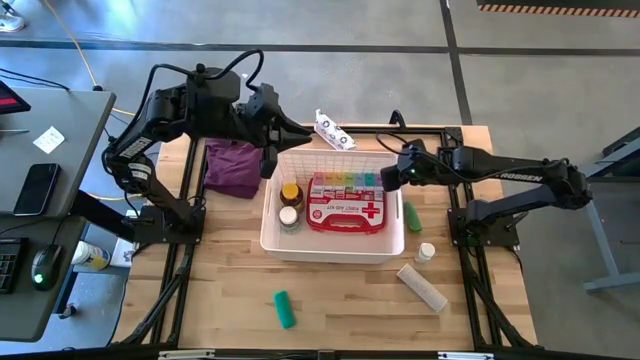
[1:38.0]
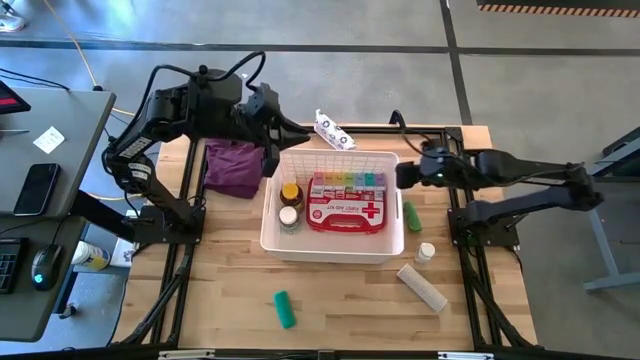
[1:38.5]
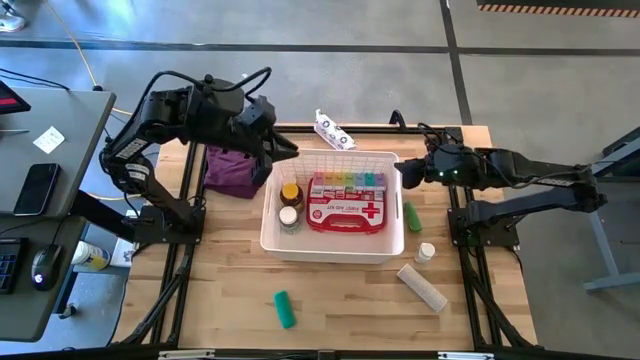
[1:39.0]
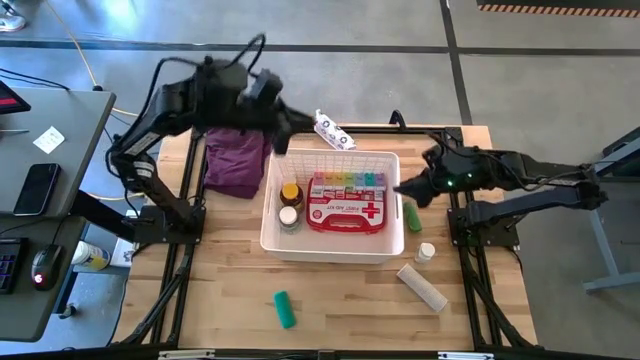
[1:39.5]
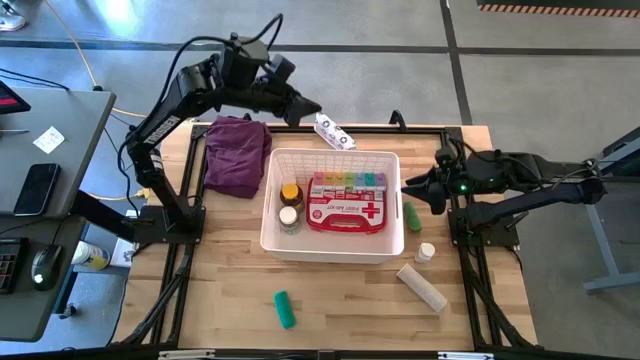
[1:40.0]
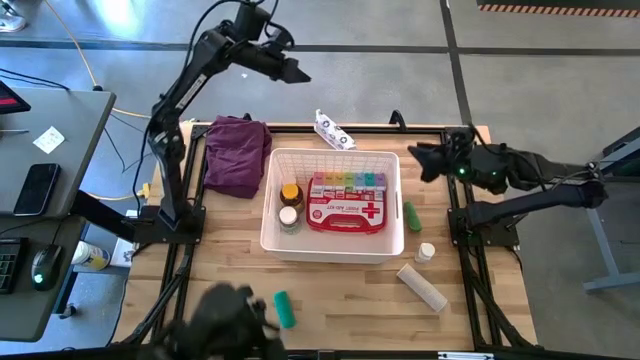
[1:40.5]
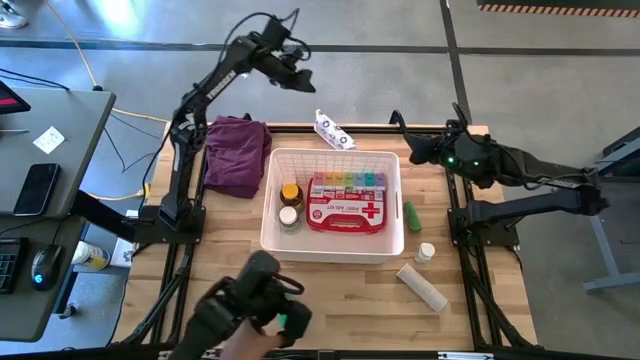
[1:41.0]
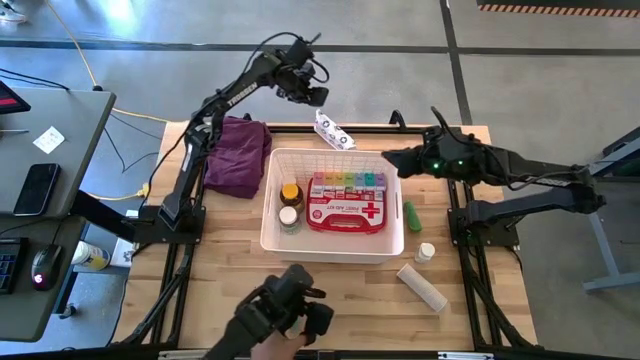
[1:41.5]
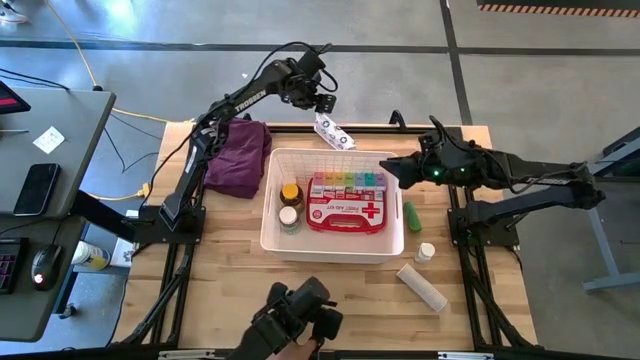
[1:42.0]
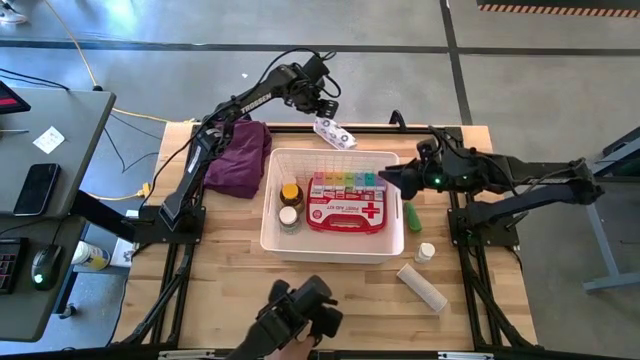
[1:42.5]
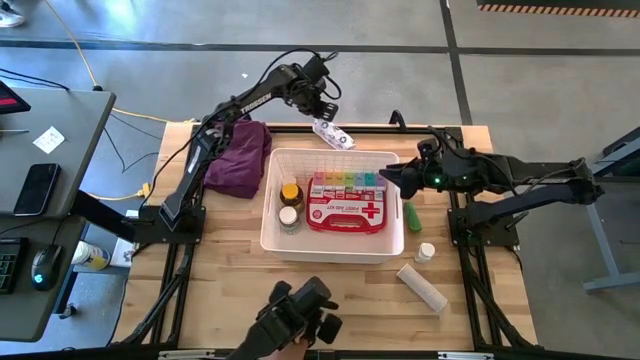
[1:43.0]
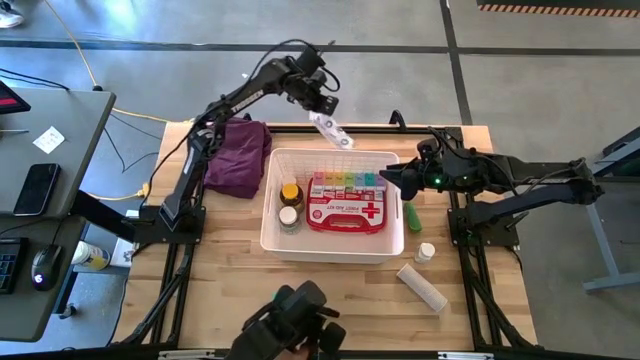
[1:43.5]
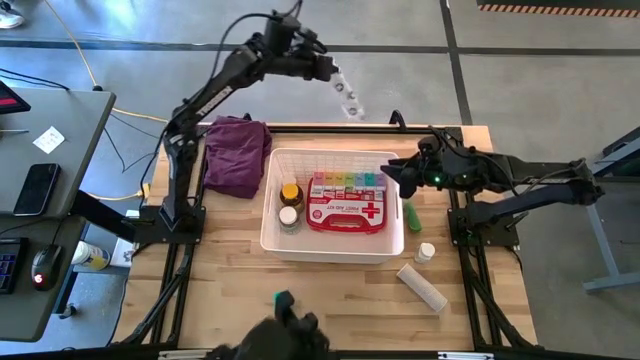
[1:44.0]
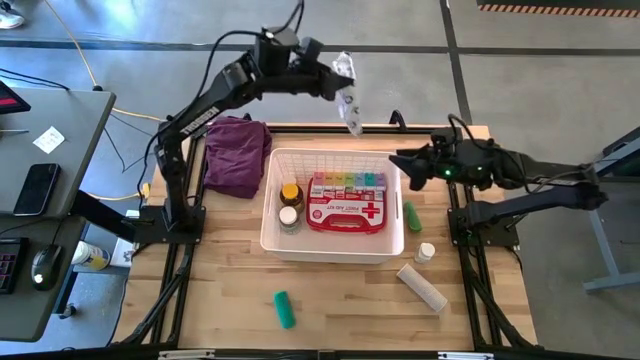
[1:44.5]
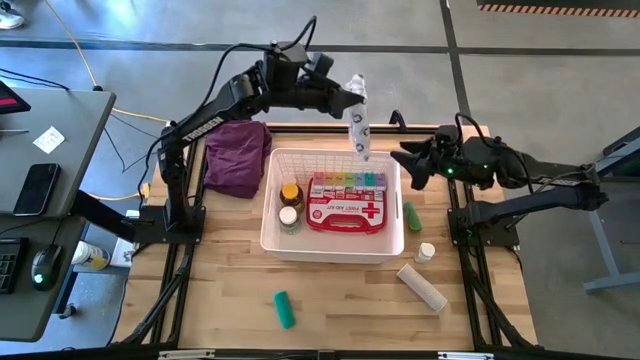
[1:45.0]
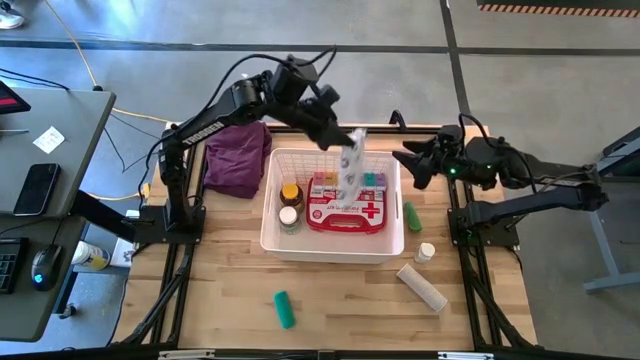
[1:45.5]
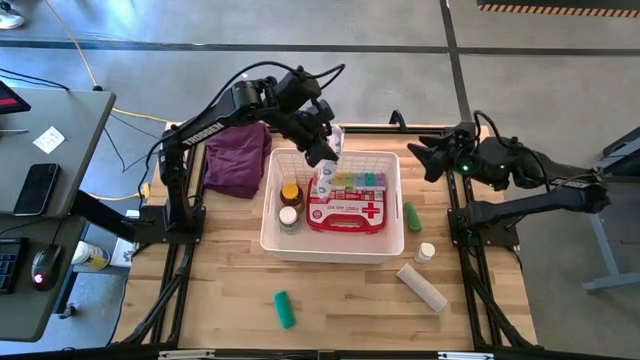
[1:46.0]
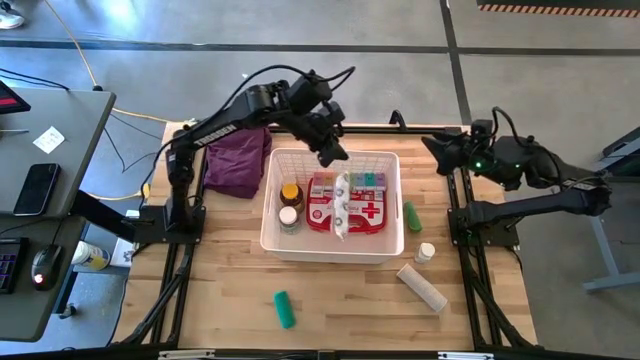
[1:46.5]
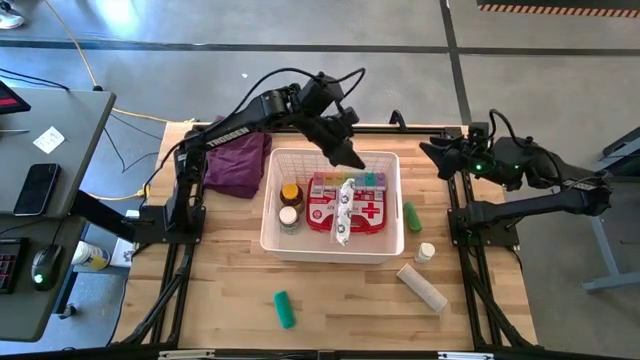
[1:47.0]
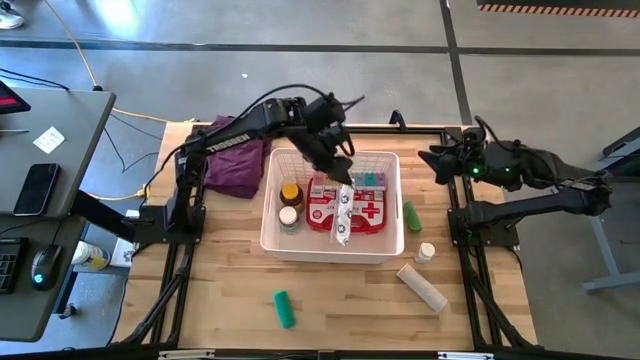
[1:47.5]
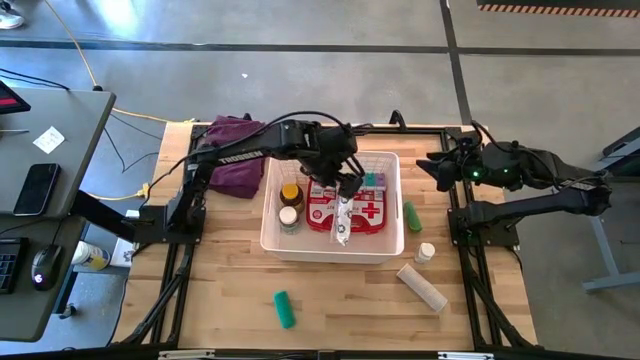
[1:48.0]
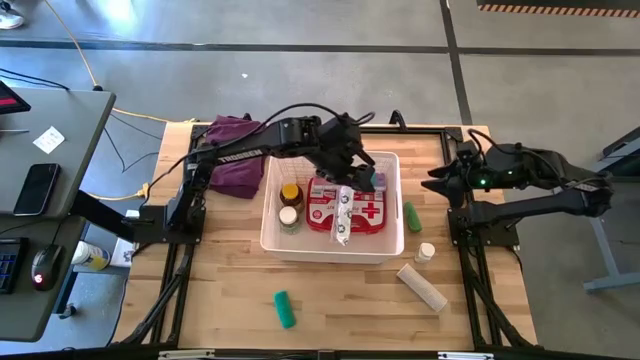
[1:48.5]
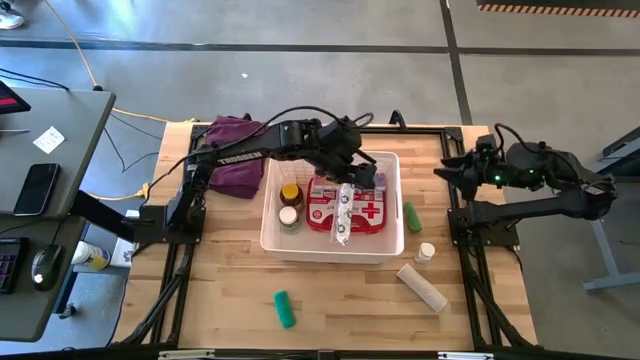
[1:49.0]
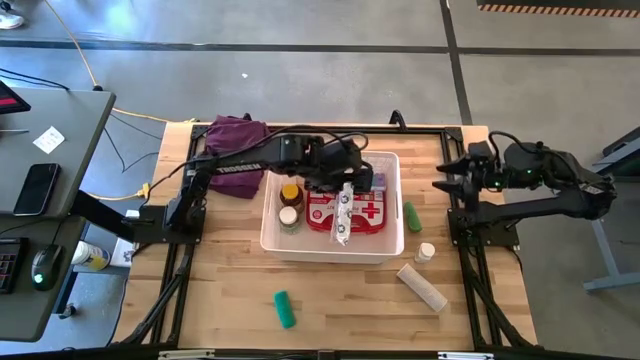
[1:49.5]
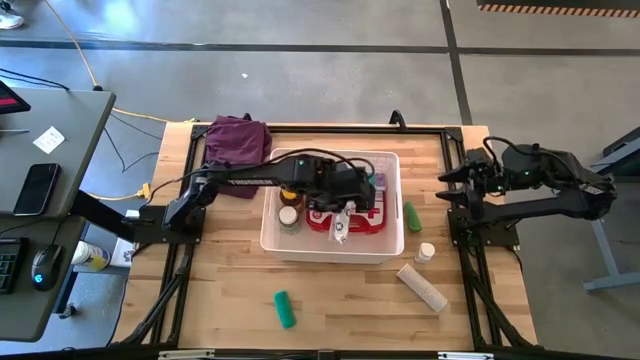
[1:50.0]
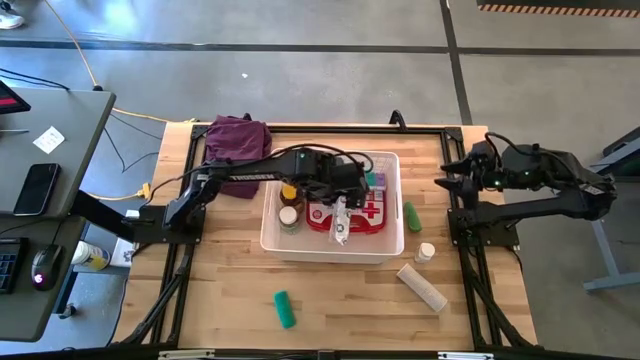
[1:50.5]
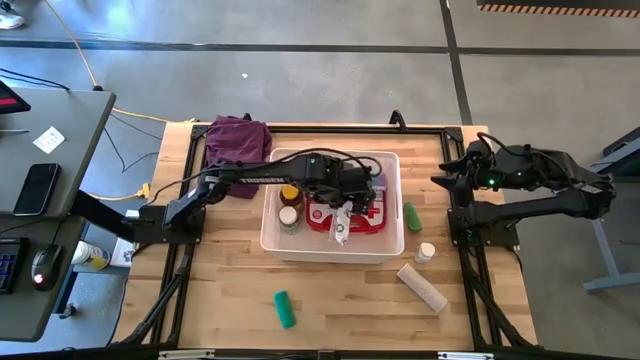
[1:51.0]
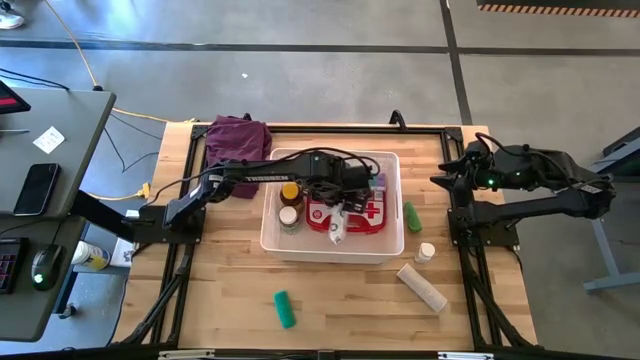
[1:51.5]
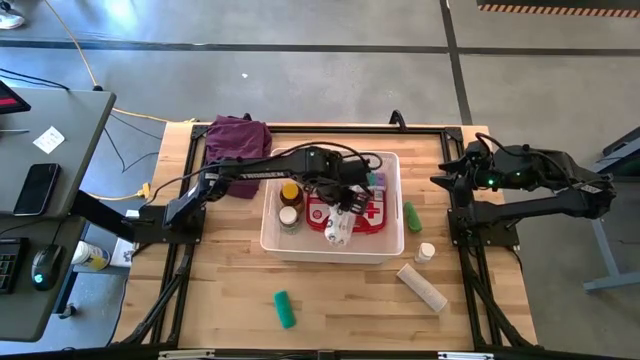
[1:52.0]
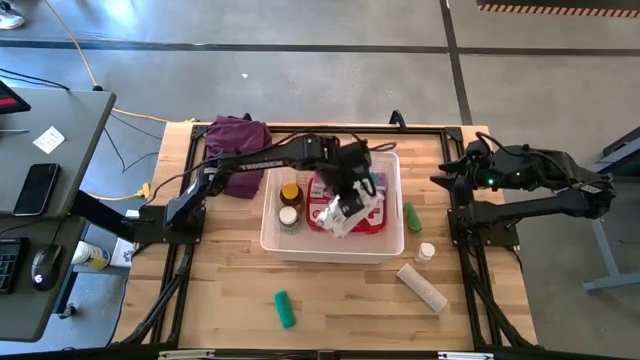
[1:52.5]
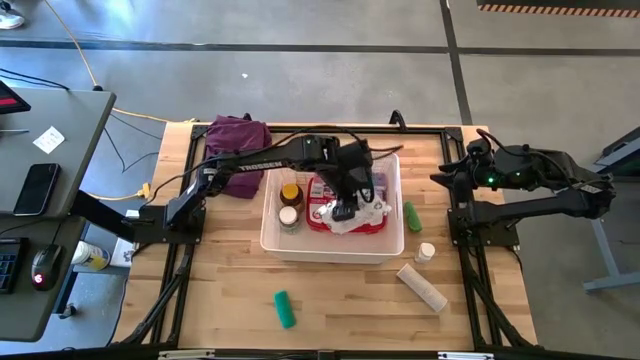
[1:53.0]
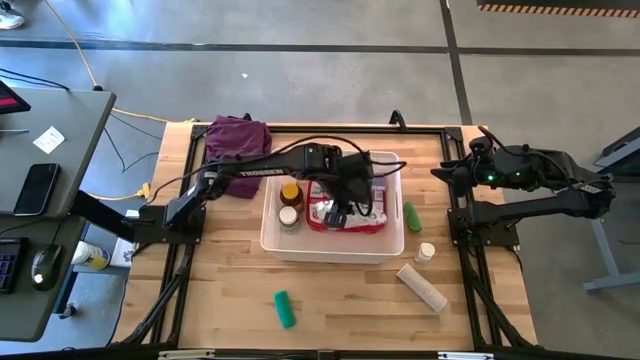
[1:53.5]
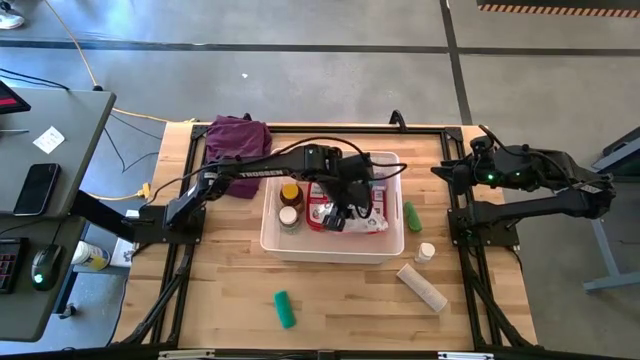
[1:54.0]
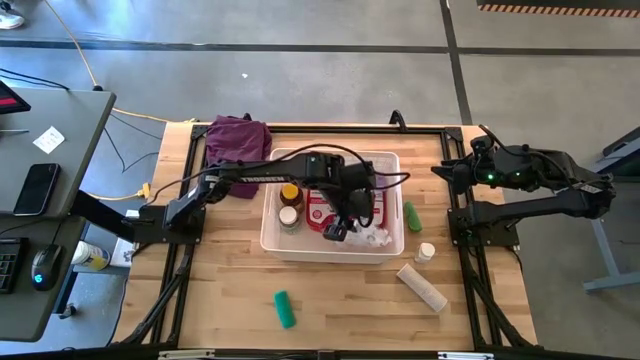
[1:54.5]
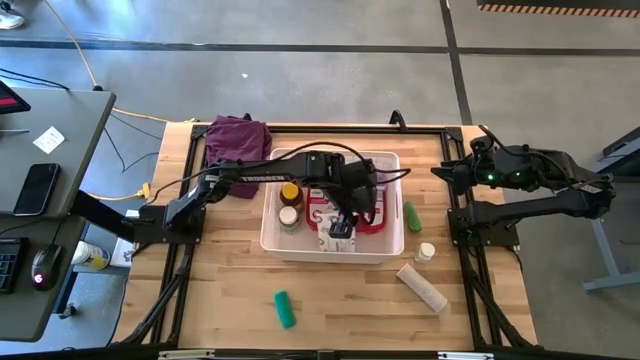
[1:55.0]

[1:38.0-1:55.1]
Task: Pick & place medical supplies in basket/bin
Put the white mailer bag into the white bin

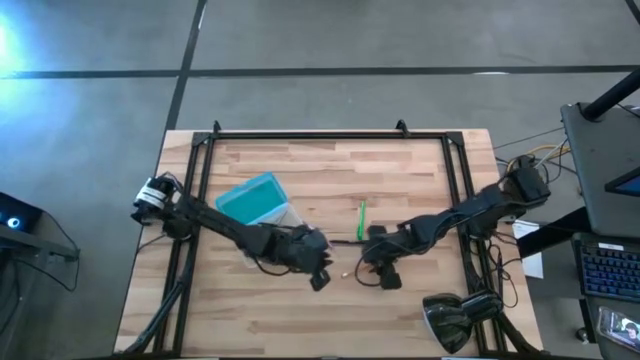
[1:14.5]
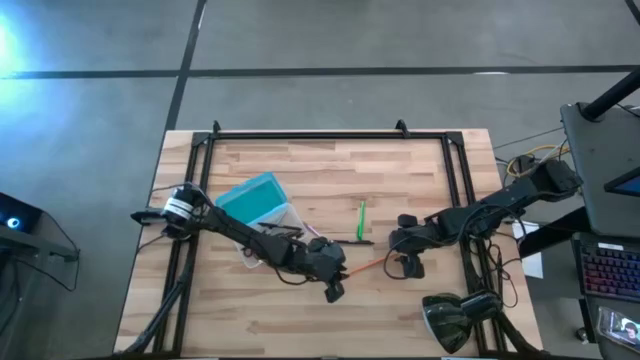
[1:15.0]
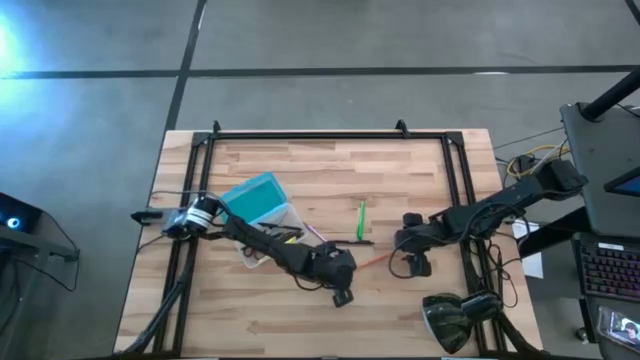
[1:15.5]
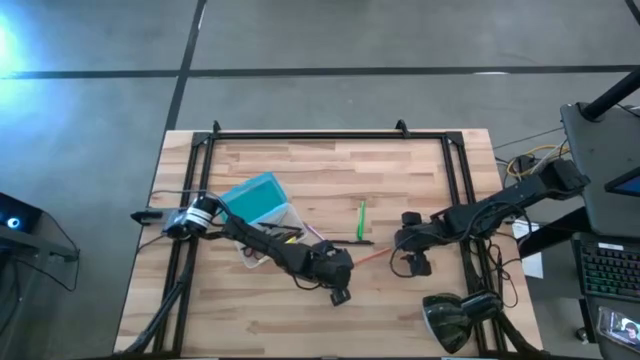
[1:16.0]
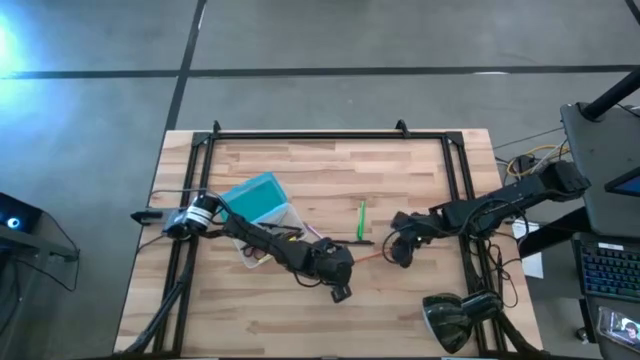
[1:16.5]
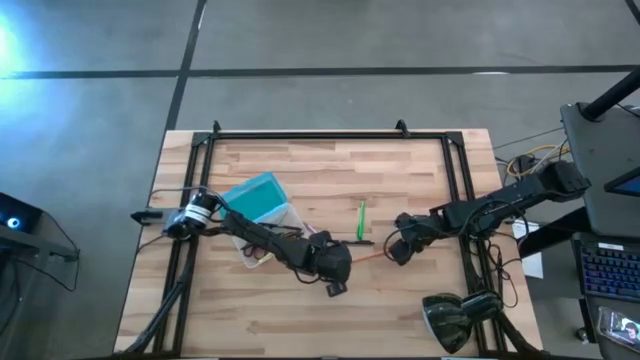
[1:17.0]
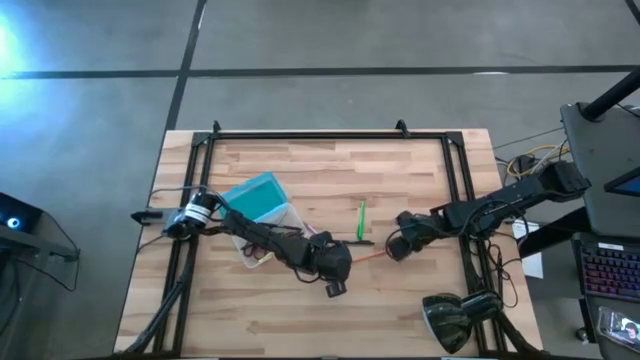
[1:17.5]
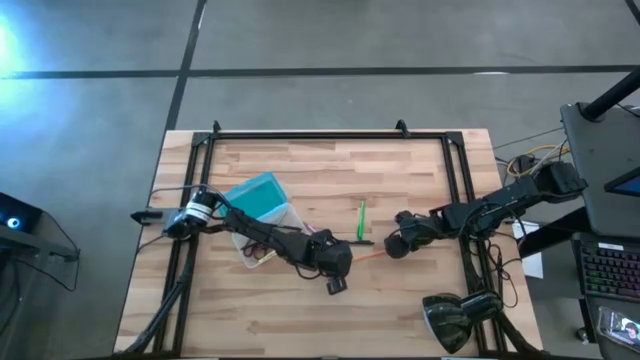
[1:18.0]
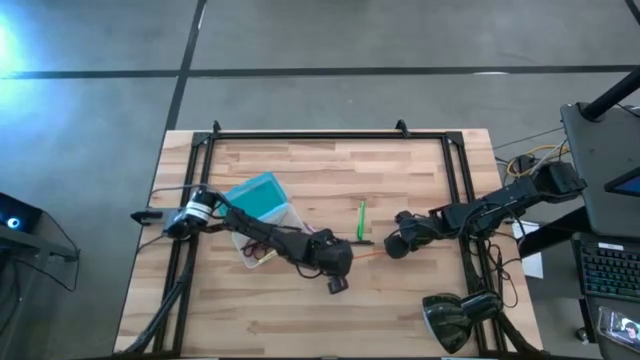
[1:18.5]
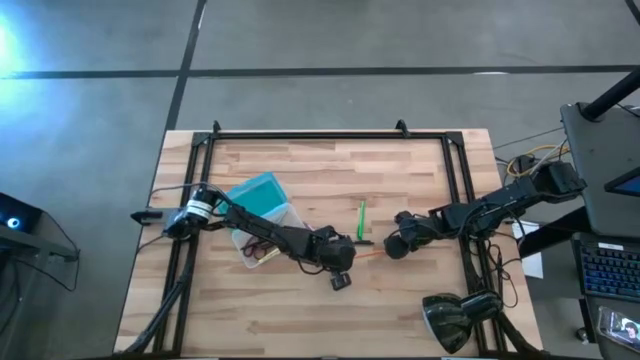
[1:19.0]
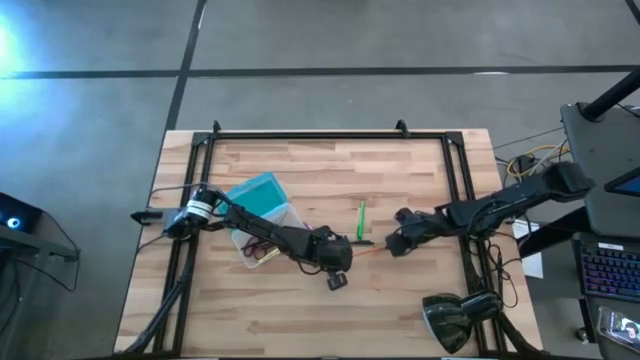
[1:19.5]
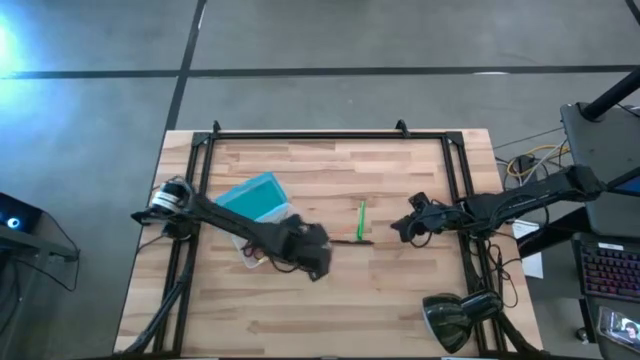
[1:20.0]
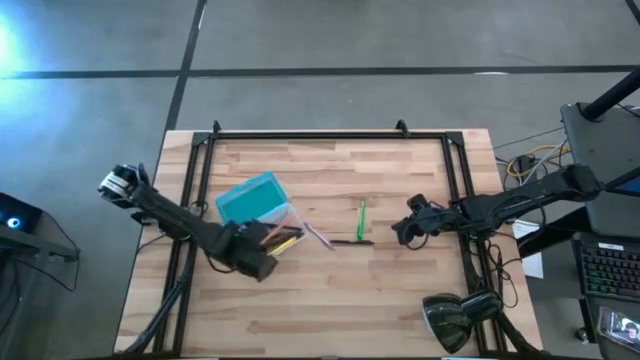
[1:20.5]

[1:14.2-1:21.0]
Task: Pick & place school supplies into a supply box
Put the orange pencil into the blue supply box
